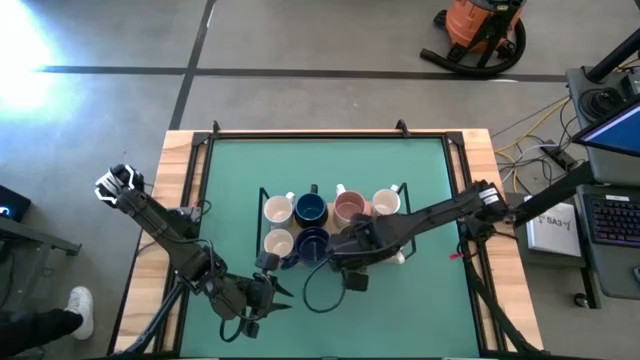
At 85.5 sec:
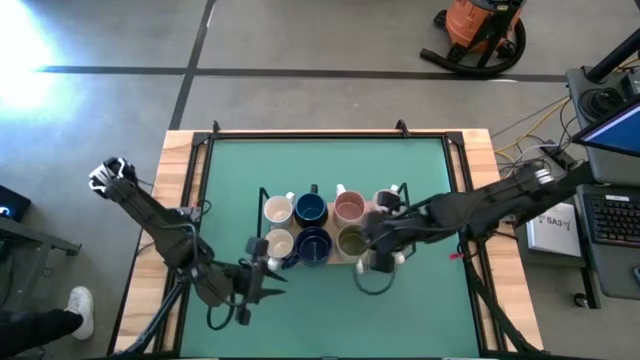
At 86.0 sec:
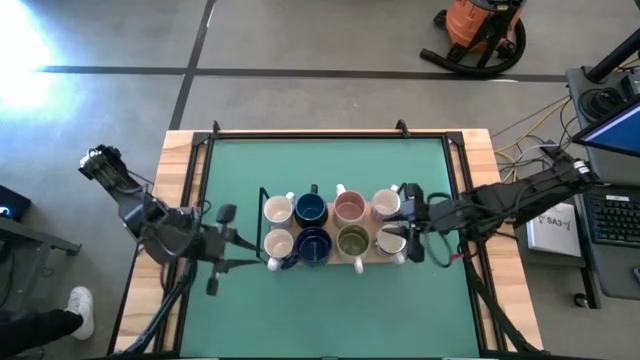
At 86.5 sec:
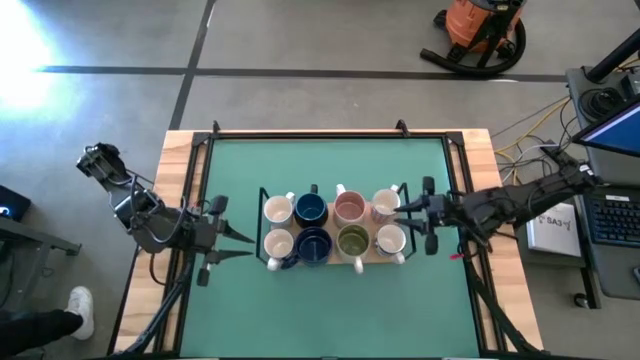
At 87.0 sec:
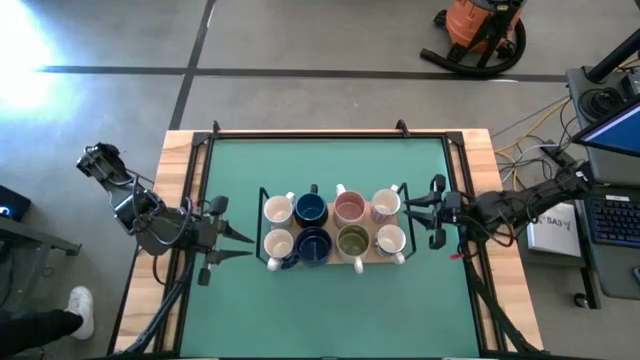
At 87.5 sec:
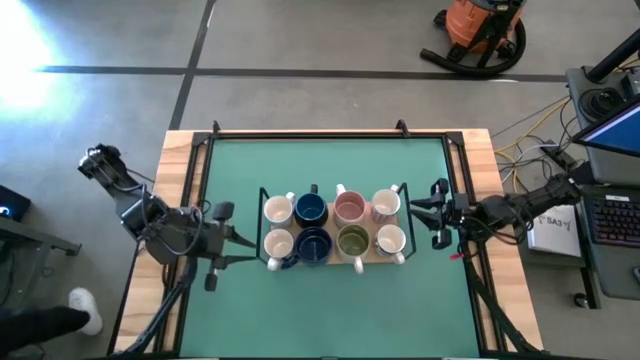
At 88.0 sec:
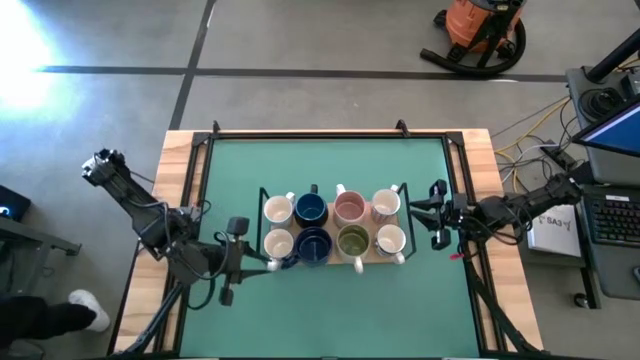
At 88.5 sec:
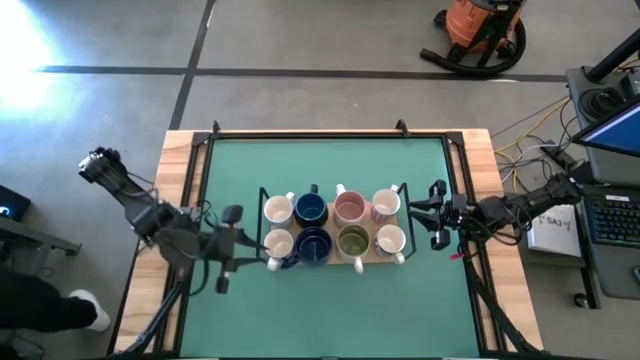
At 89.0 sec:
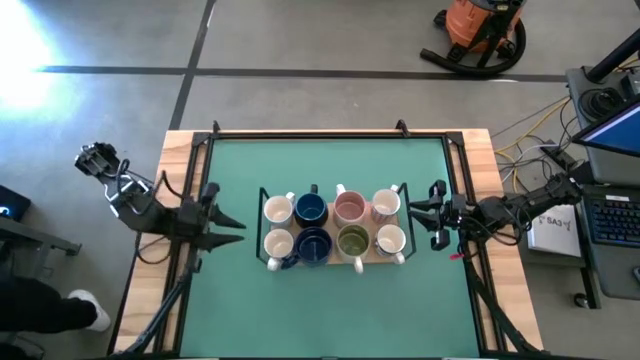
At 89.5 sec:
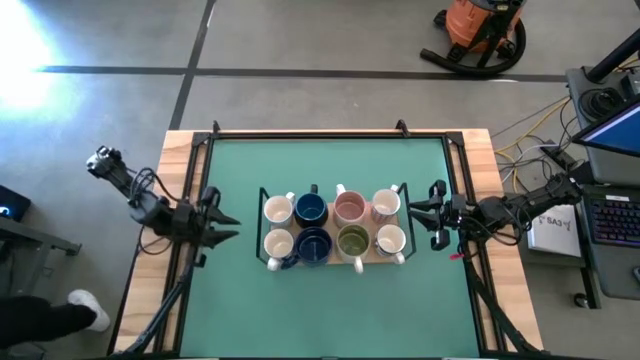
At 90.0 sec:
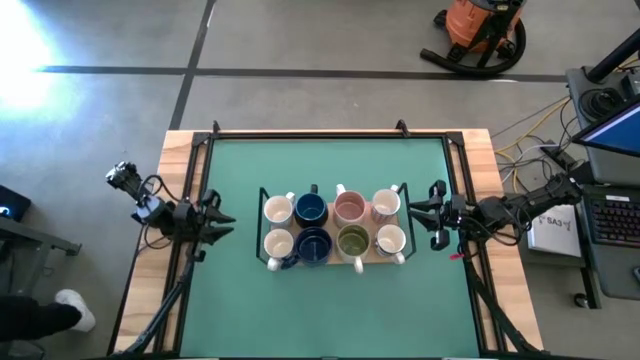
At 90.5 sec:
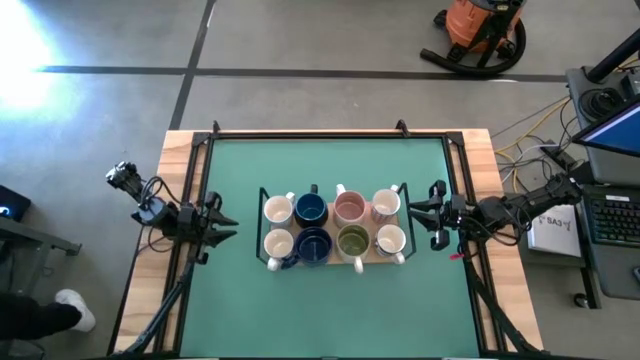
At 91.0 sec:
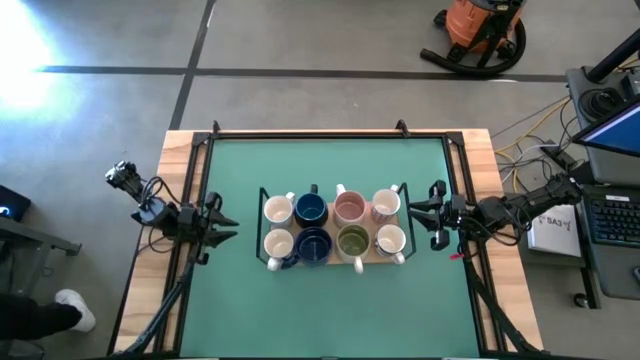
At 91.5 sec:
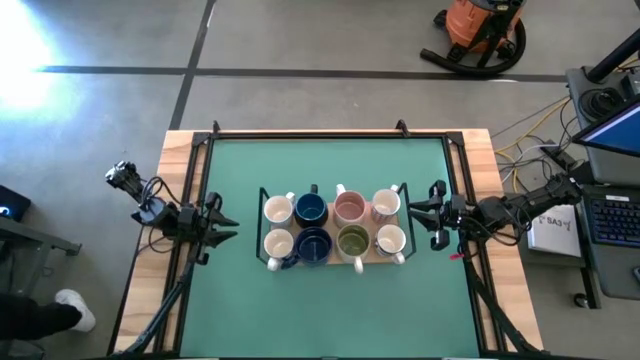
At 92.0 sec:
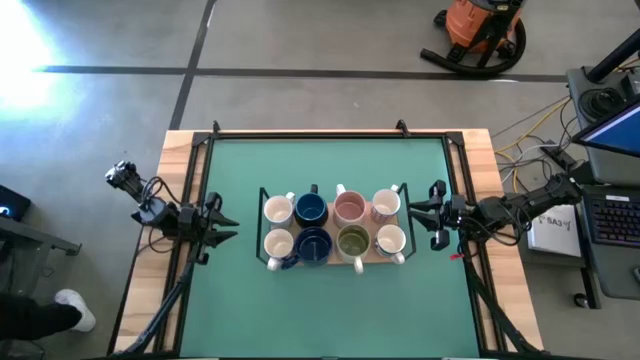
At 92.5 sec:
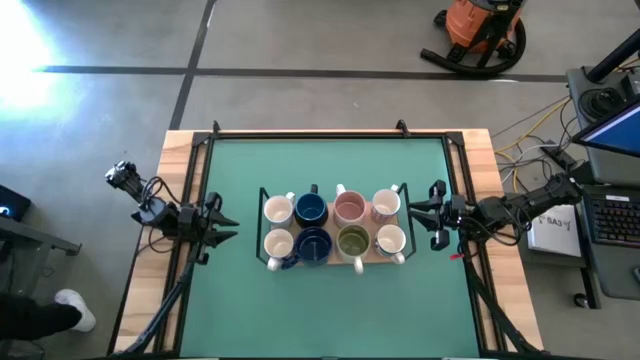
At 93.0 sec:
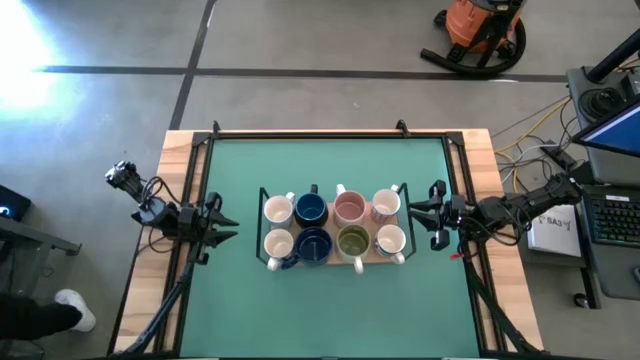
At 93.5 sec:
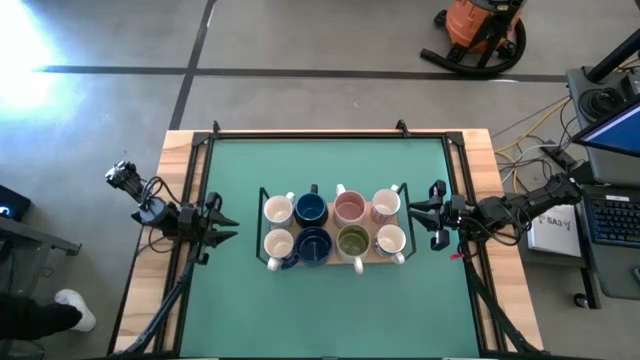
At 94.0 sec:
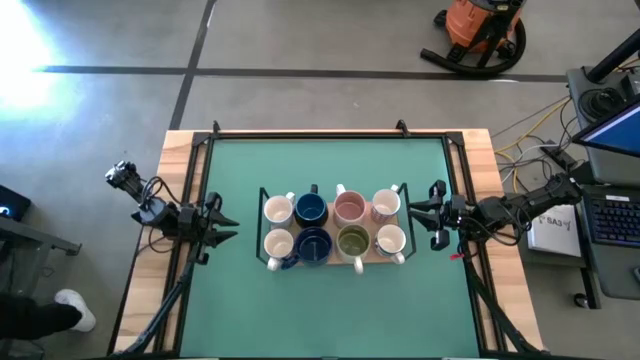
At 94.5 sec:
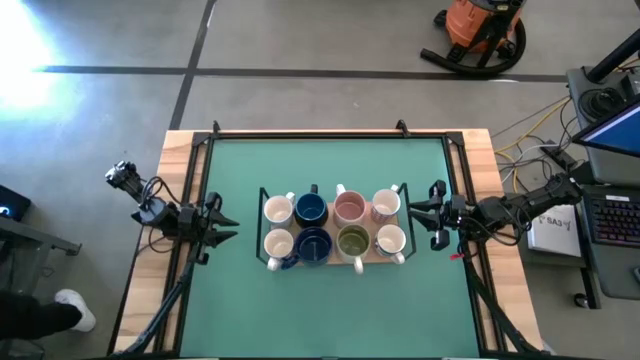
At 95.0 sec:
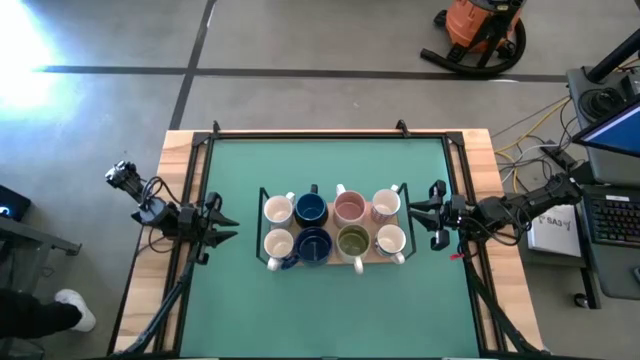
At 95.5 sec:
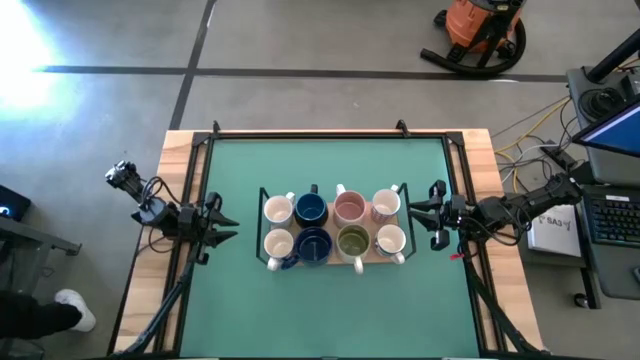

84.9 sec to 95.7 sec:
Task: Place coffee mugs
Return to Home Position

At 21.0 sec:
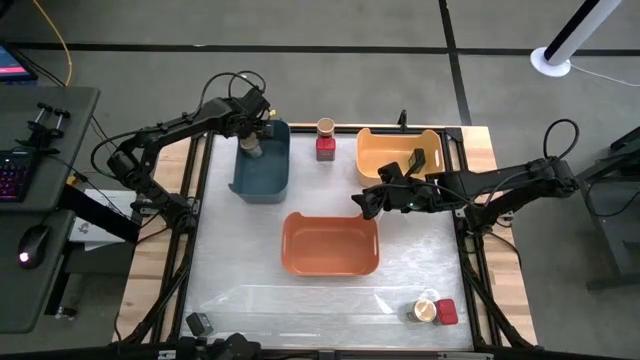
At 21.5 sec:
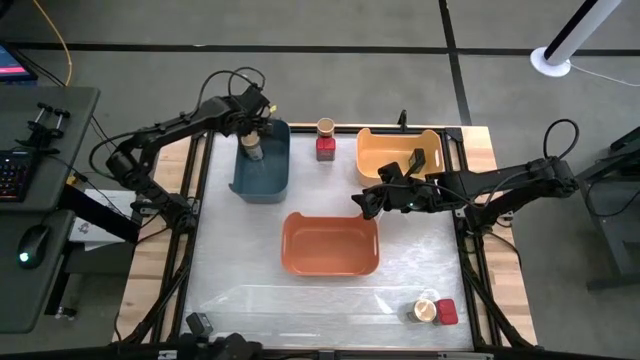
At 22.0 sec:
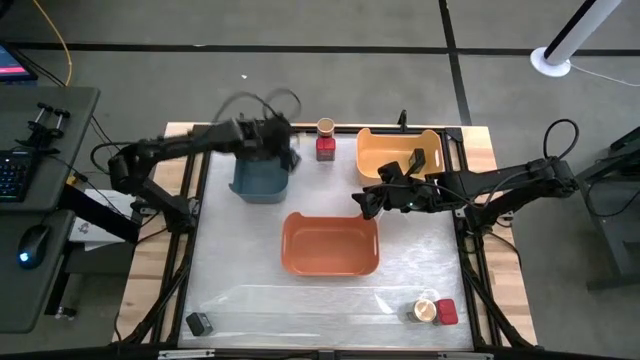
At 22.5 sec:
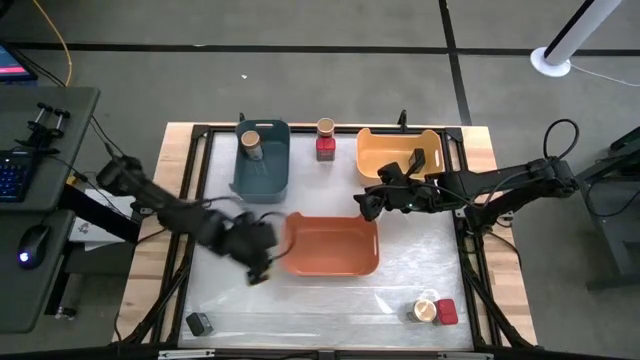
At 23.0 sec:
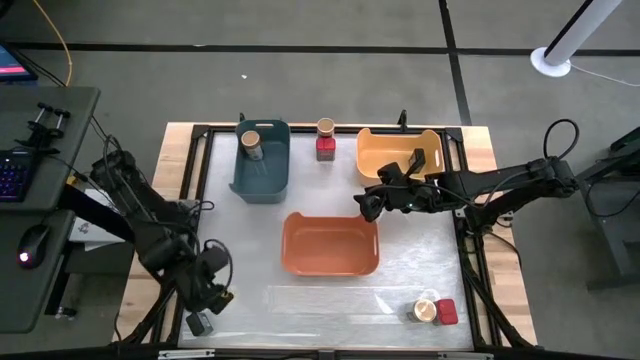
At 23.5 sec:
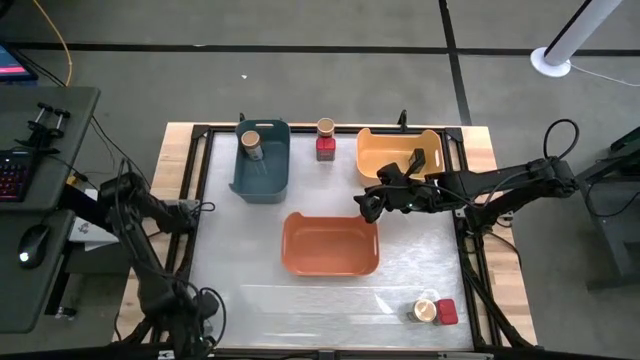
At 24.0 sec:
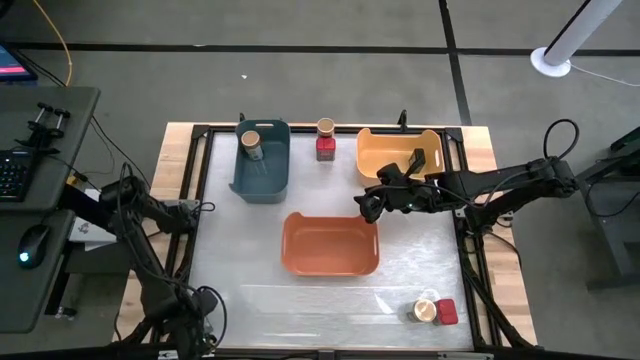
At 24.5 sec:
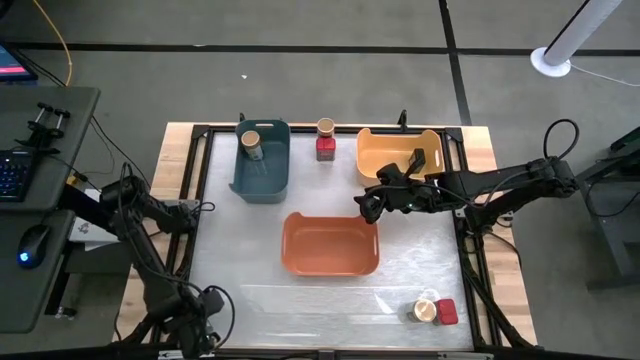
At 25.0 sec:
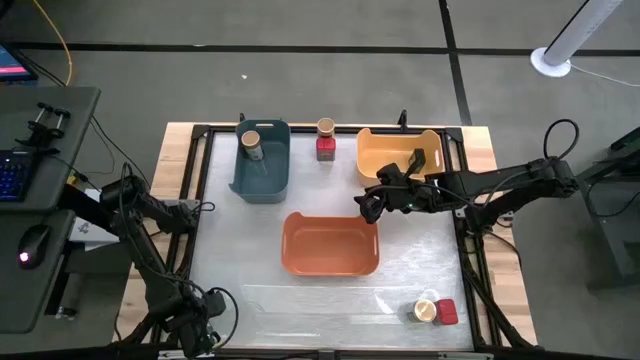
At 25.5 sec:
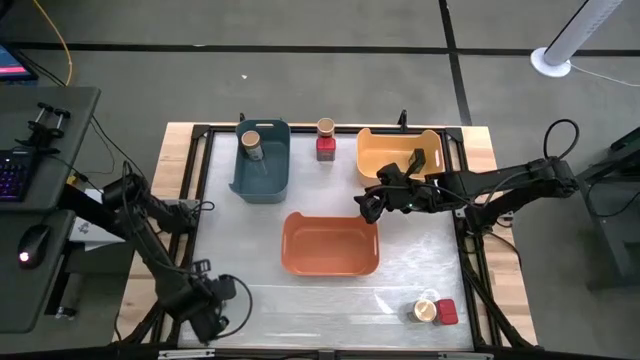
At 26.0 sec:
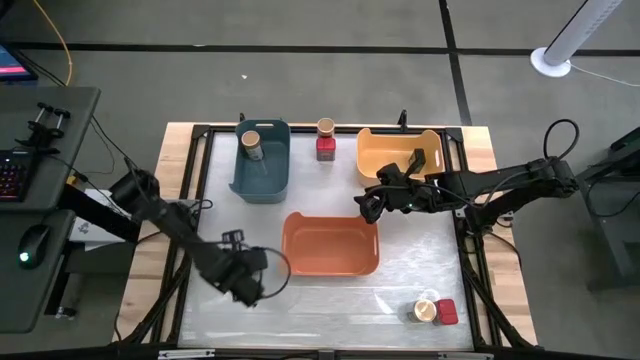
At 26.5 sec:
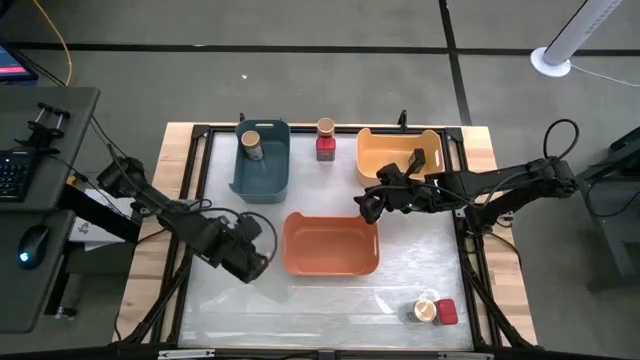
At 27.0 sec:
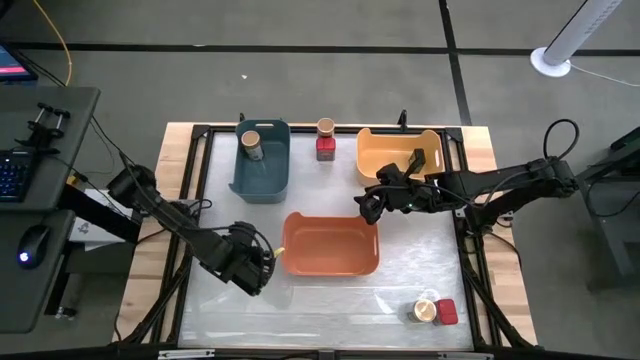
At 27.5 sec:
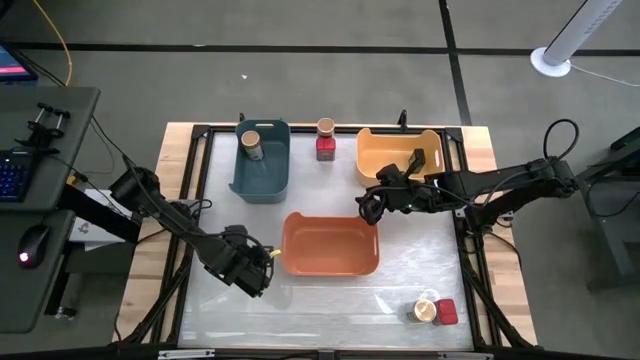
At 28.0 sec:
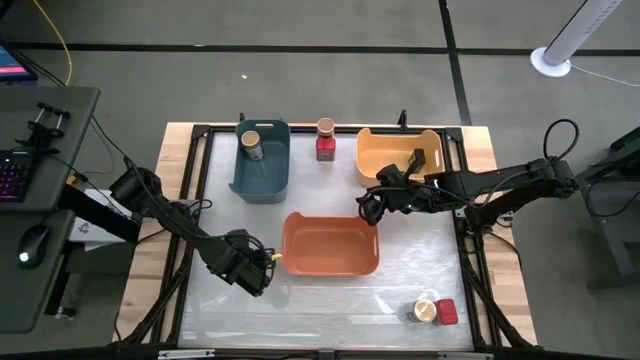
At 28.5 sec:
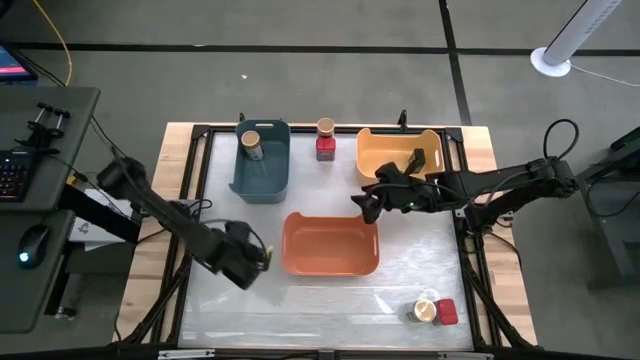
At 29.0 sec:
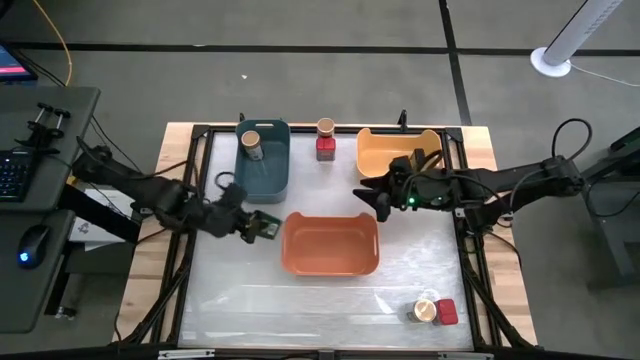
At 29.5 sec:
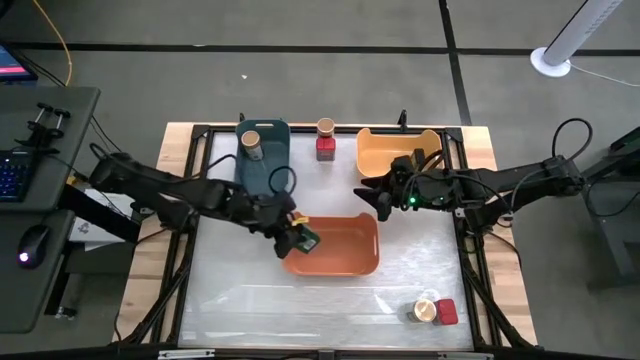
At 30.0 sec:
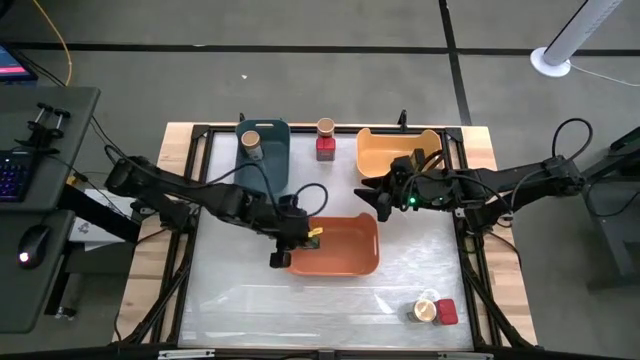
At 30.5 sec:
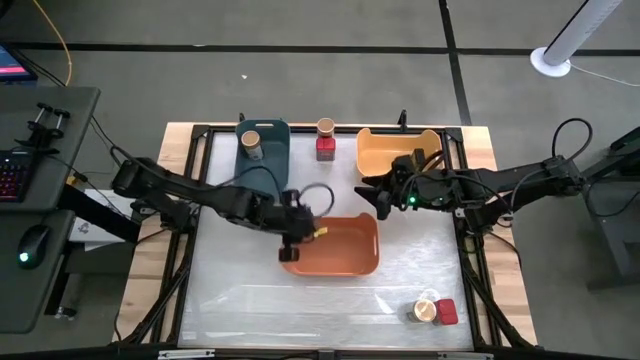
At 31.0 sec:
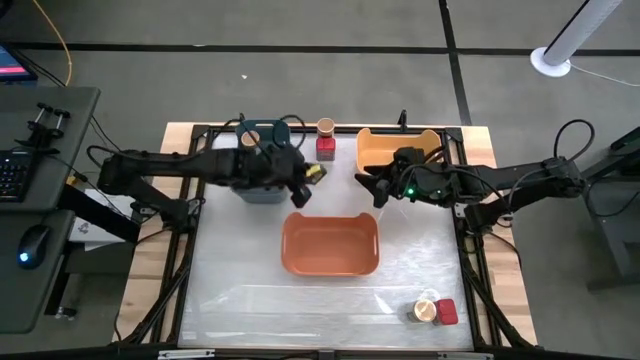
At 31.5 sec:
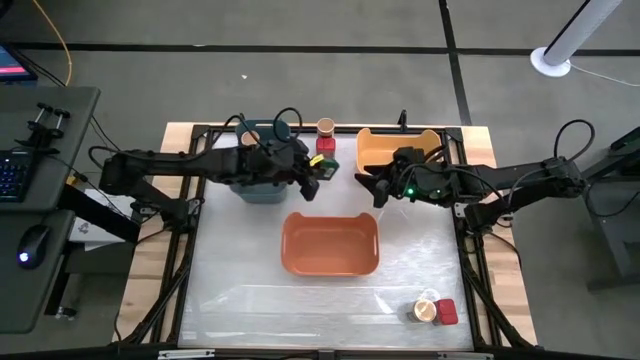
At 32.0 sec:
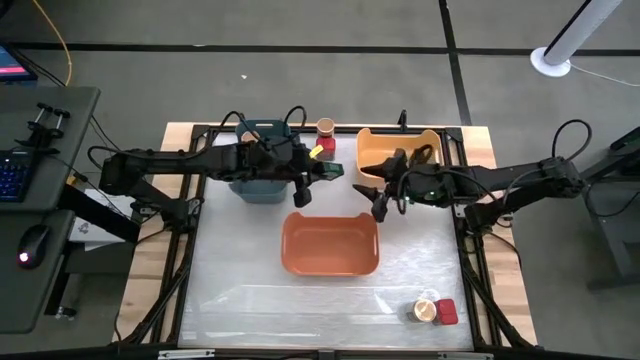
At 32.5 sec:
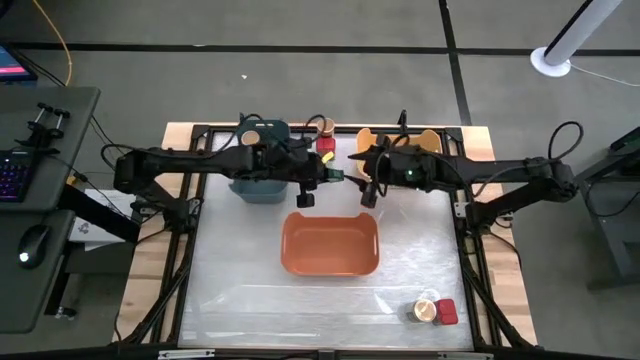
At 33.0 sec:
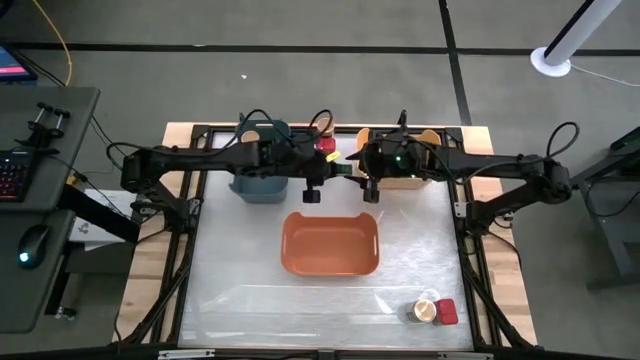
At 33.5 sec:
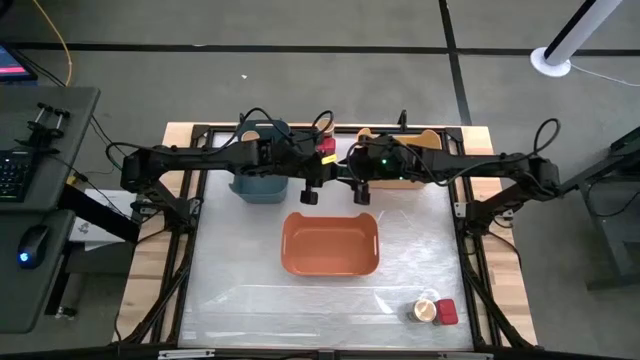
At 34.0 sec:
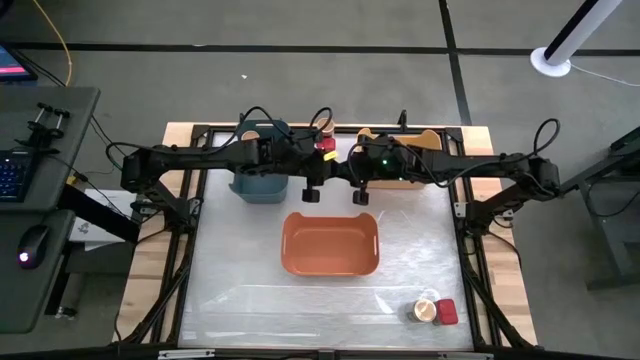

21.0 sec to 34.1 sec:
Task: Sort spices by type
Put the black seasoning can into the yellow bin
